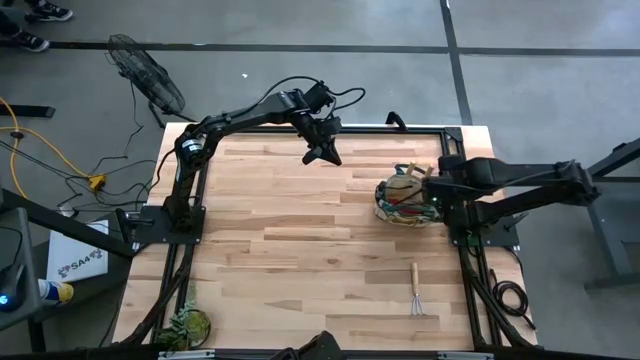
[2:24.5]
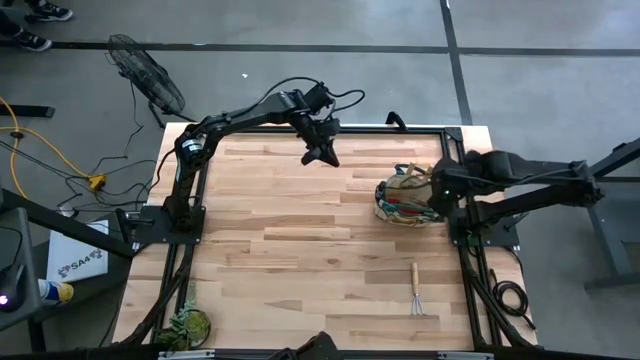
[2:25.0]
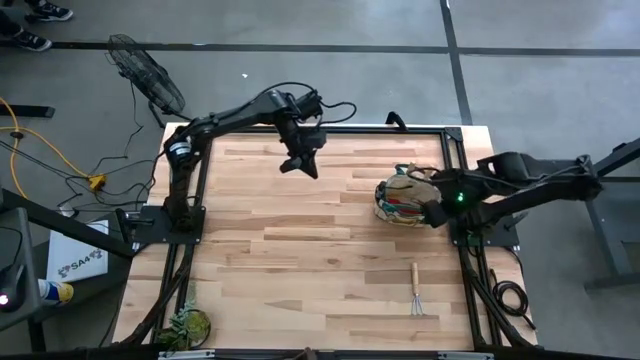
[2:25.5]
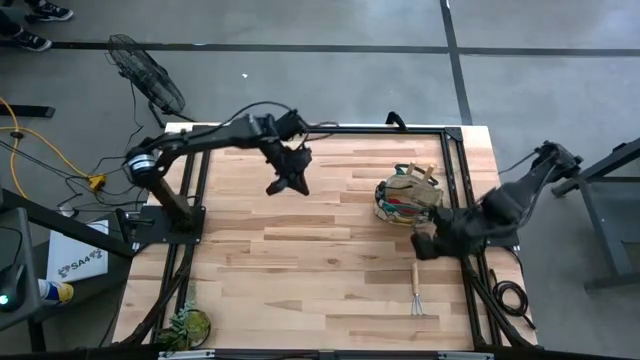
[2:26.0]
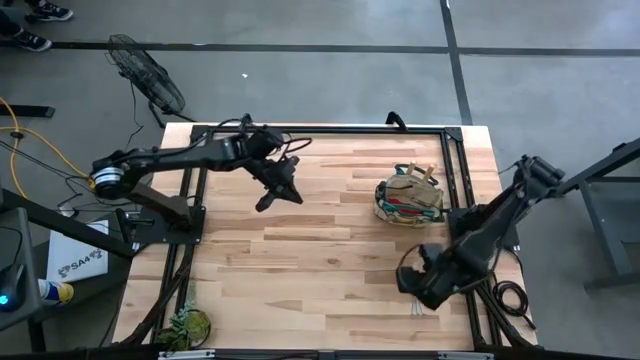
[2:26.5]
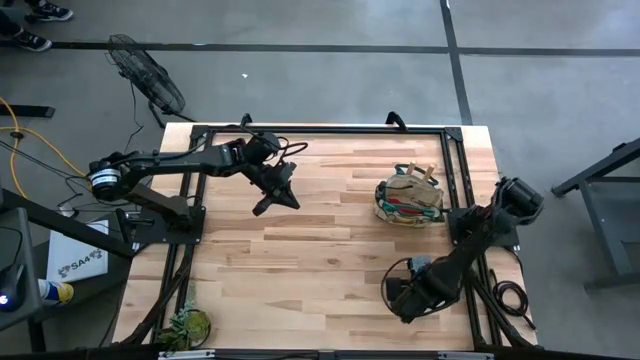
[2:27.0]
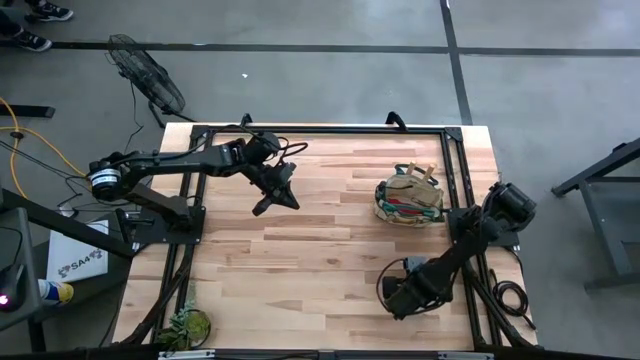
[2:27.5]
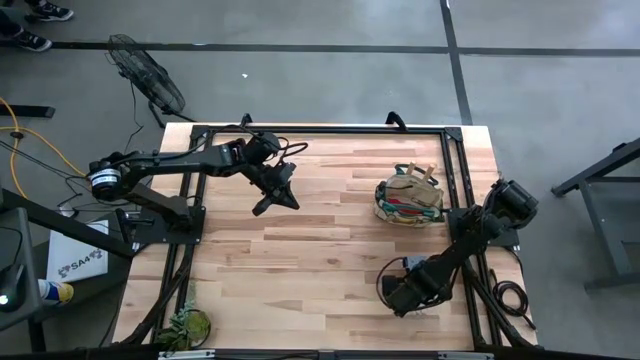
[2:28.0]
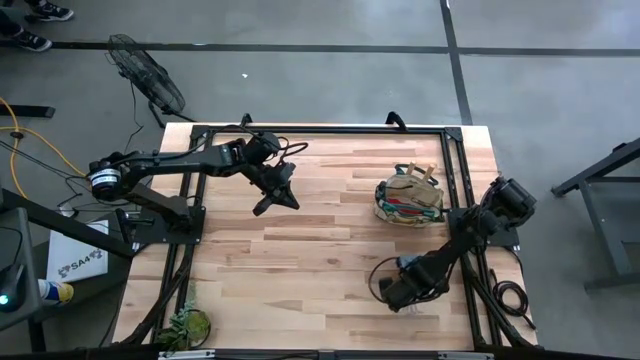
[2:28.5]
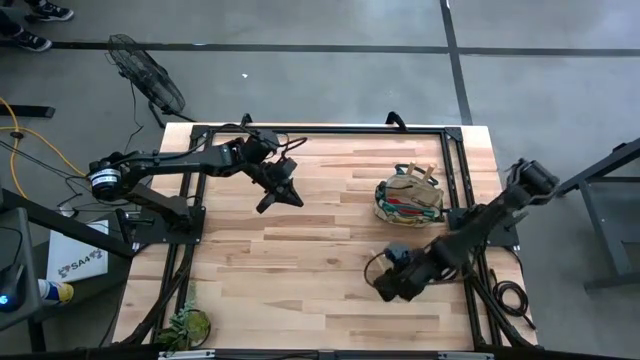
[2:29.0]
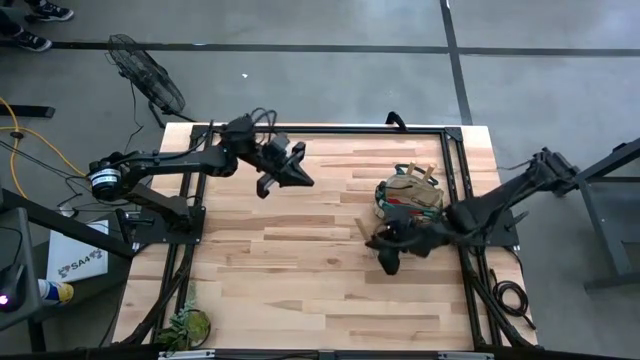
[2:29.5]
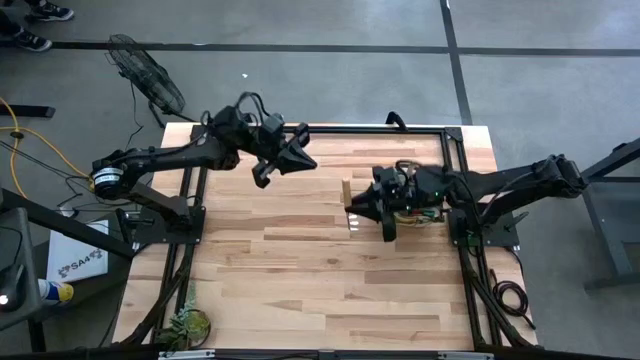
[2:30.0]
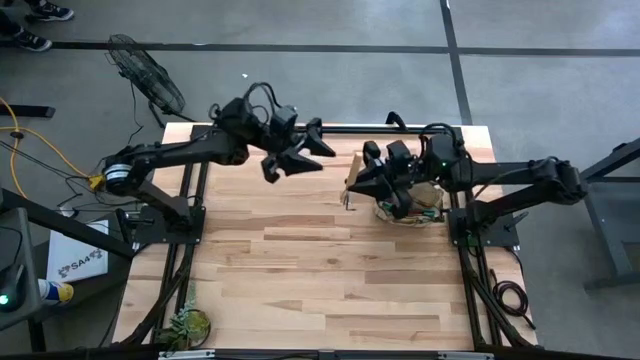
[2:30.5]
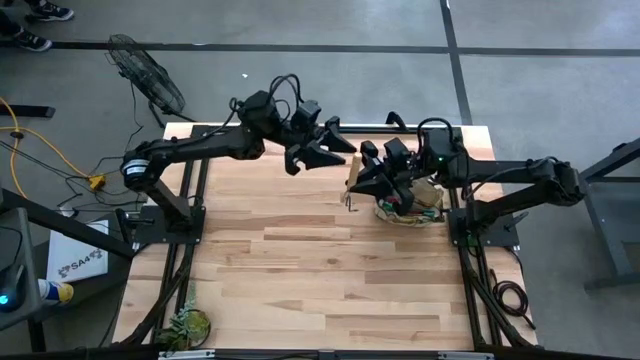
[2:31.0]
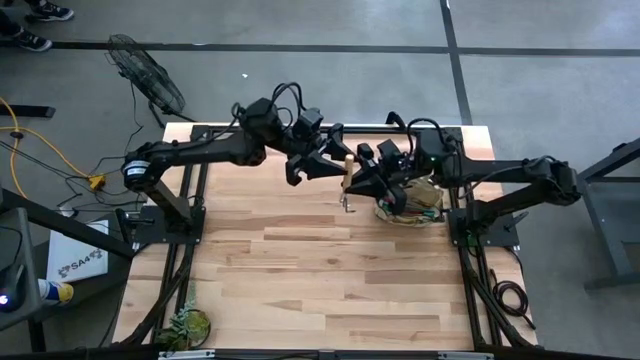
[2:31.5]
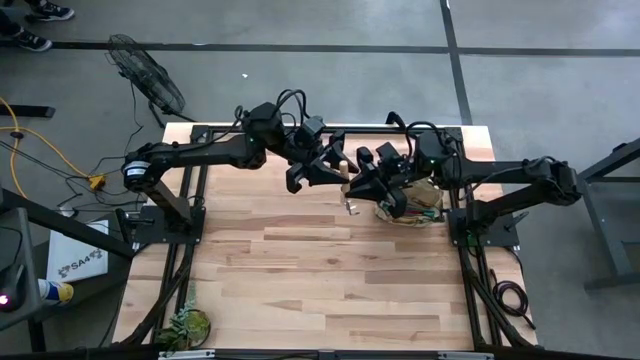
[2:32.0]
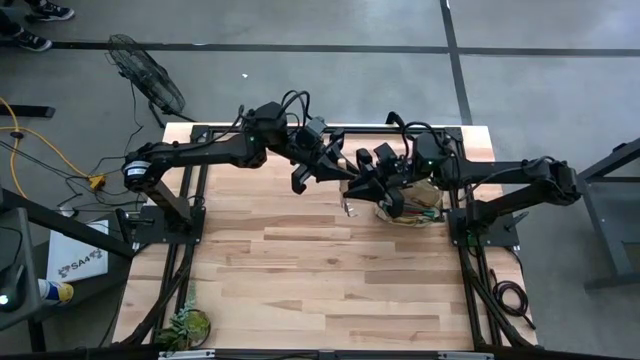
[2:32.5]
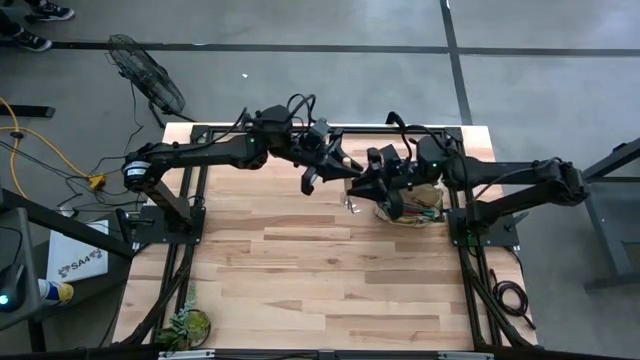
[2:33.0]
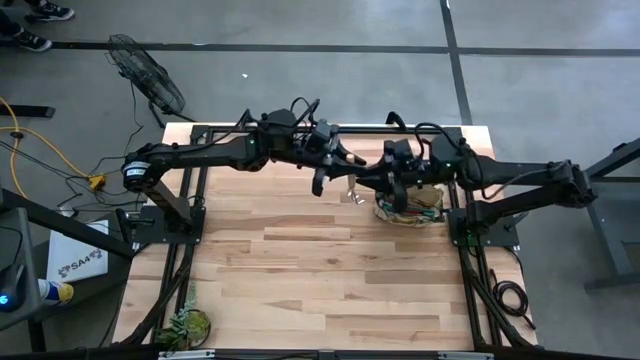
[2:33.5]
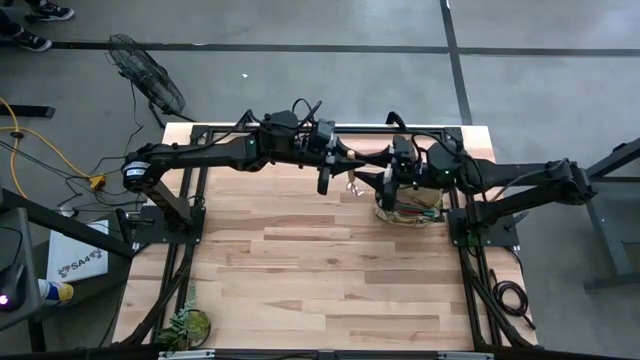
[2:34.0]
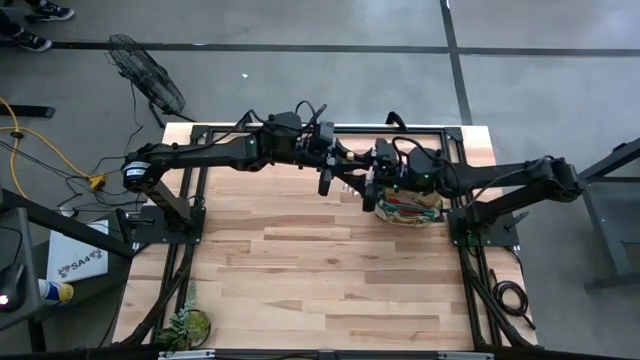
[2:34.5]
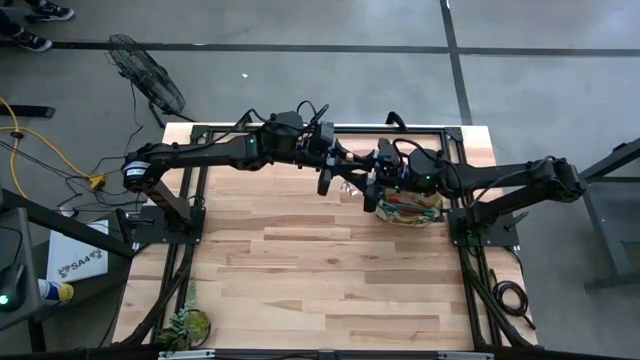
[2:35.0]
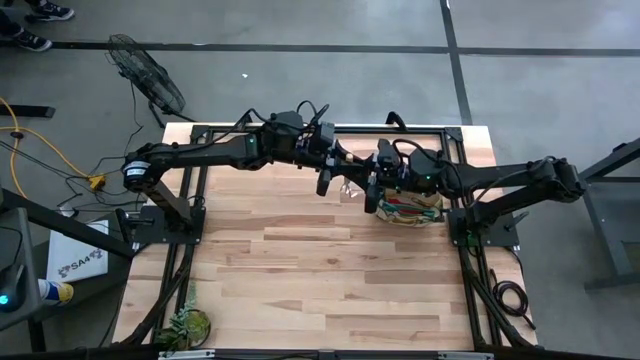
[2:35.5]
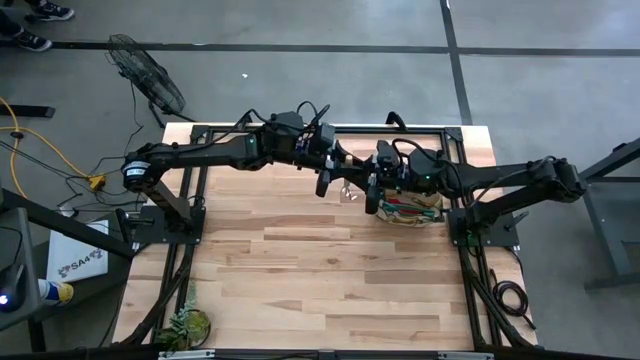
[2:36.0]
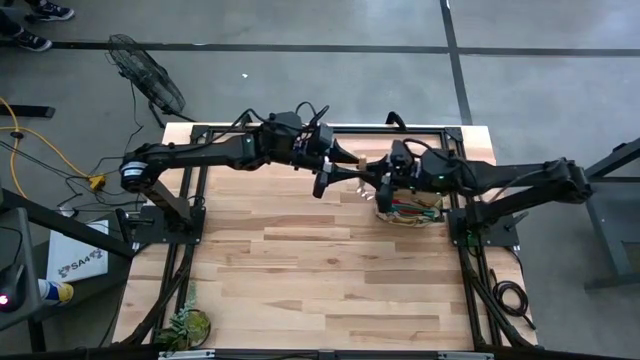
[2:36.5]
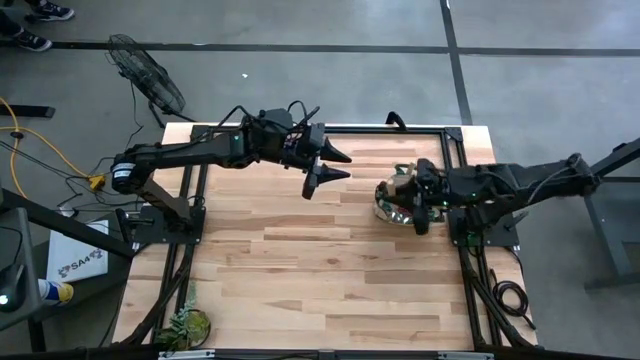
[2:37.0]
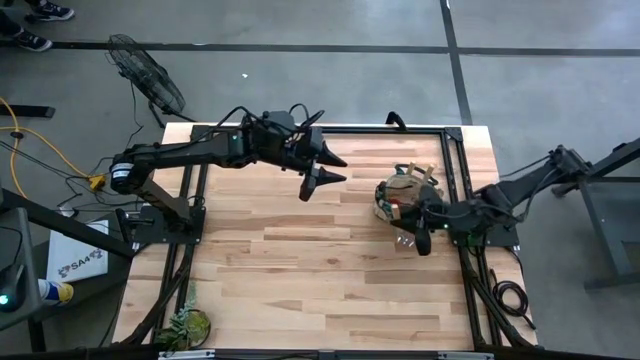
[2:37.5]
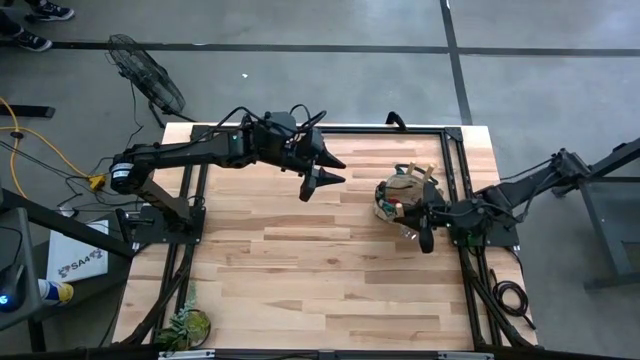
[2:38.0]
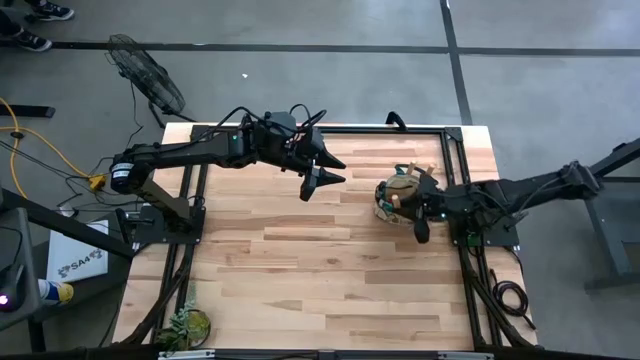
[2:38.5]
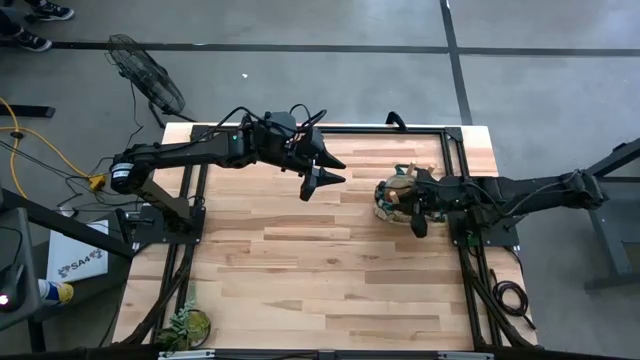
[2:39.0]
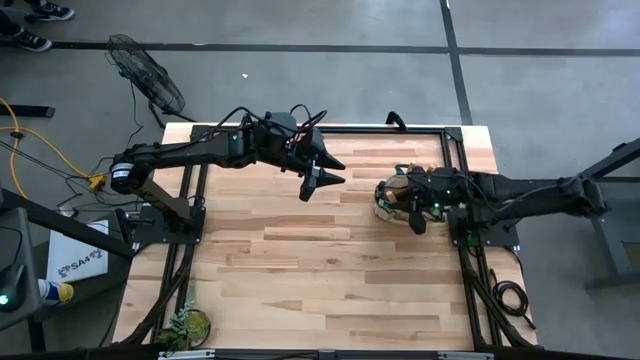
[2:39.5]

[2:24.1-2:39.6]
Task: Pick & Place Garden tools in Gardening bag
Put the hand rake into the gardening bag

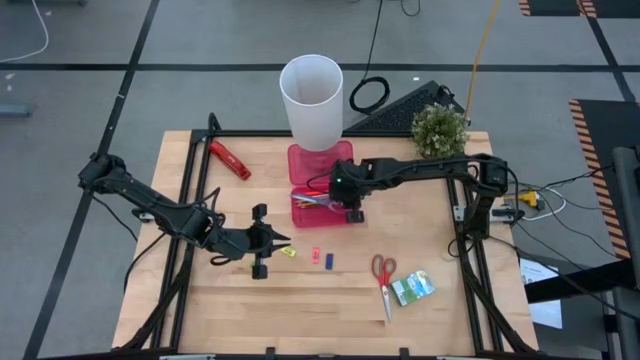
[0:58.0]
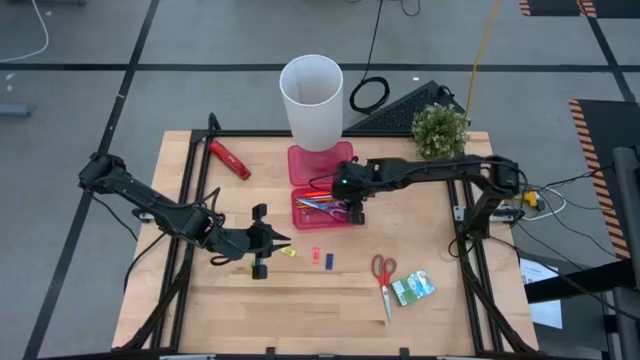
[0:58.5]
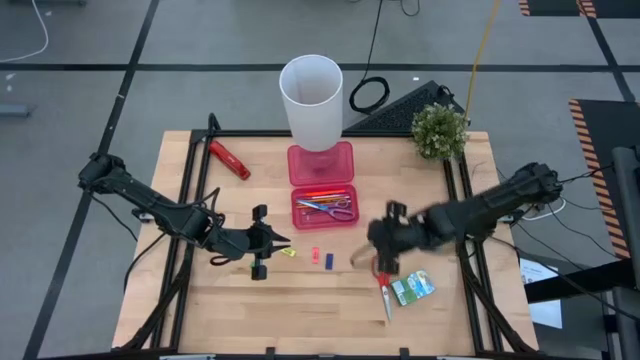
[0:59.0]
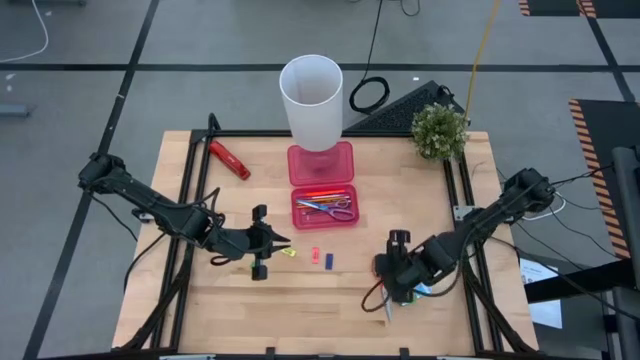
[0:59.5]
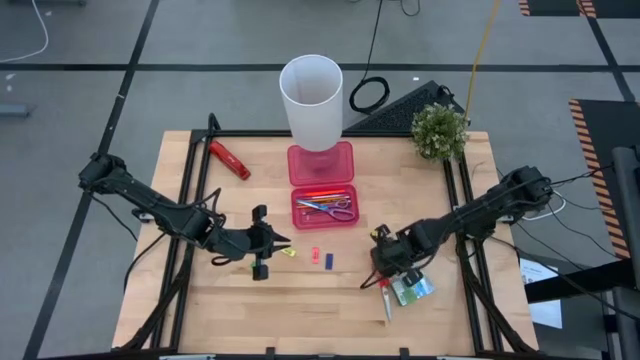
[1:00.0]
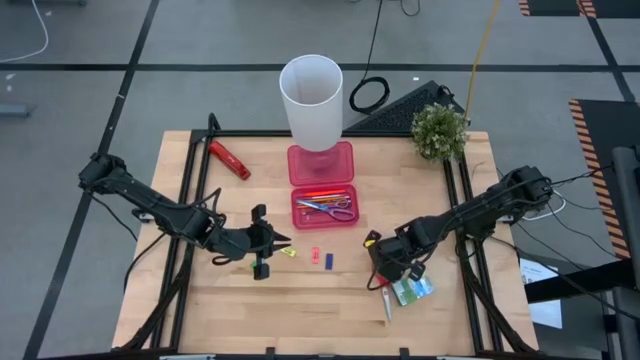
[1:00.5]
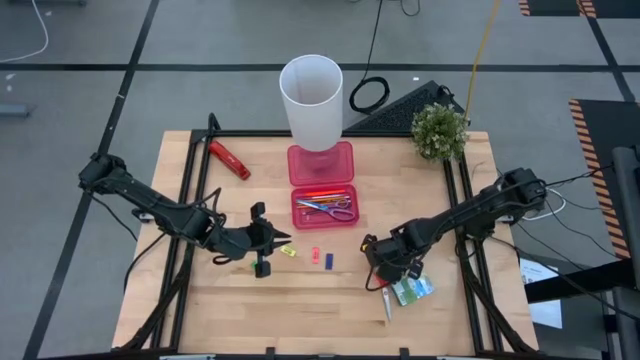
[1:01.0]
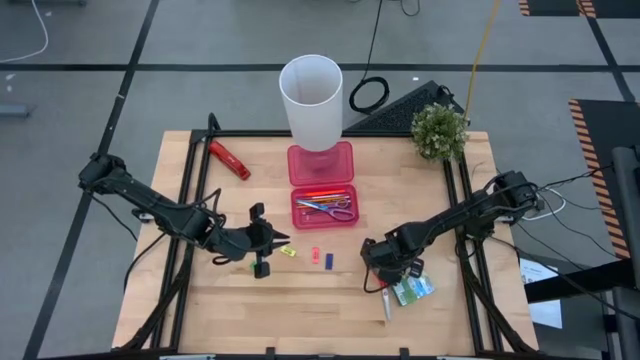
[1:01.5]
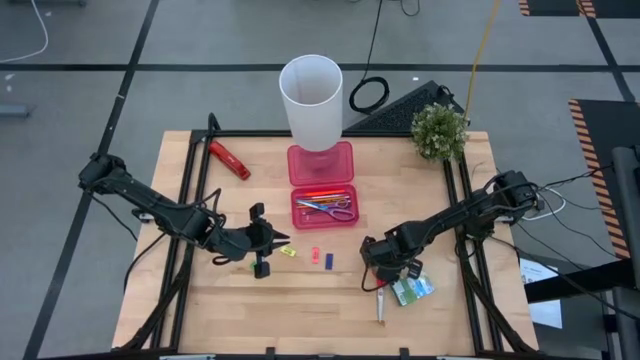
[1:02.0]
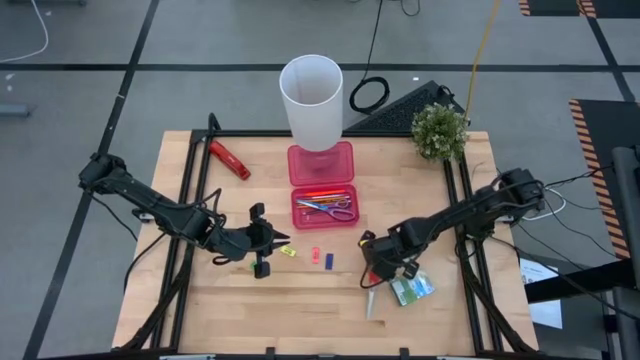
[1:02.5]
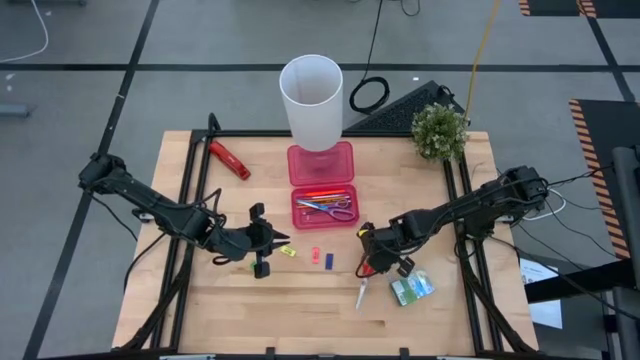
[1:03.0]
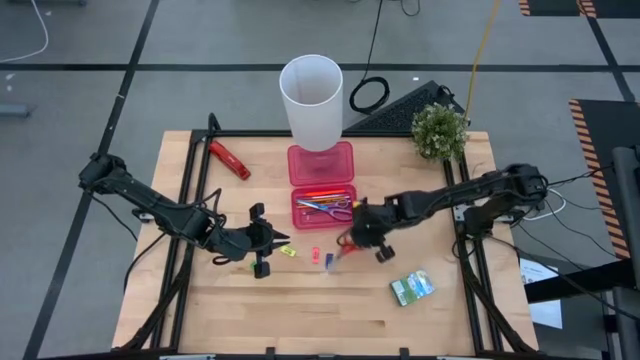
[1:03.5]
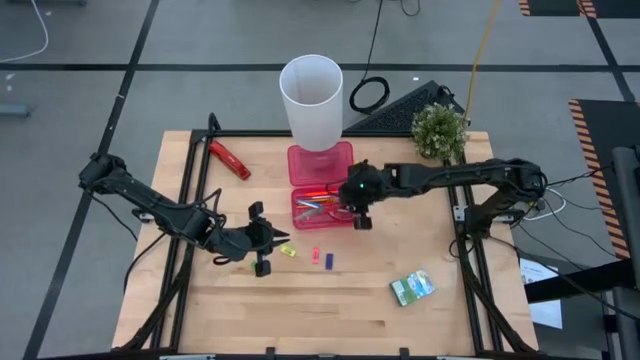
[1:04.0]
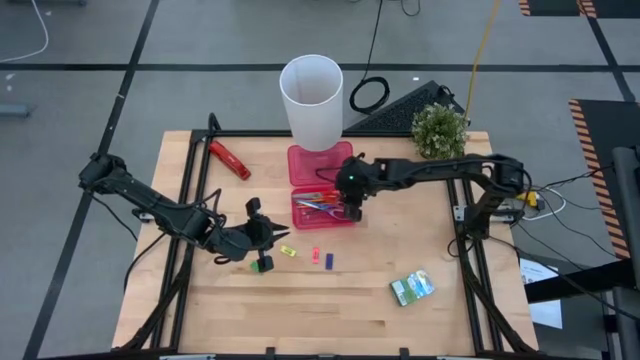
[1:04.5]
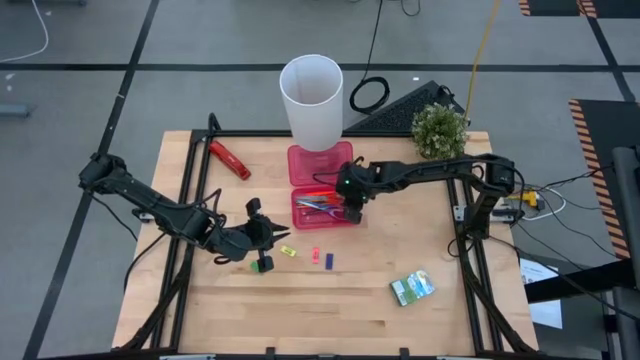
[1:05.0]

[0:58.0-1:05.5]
Task: Pack school essentials
Put the orange scissors into the pink supply box
